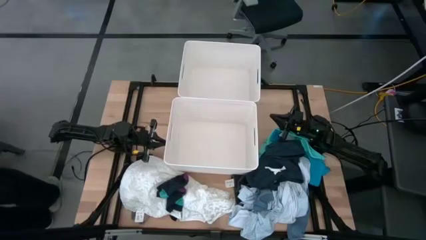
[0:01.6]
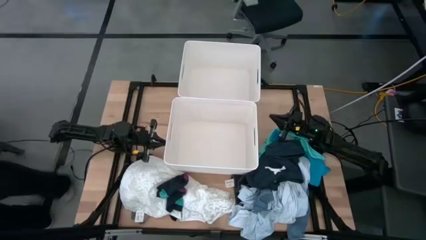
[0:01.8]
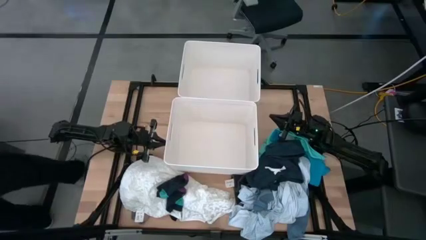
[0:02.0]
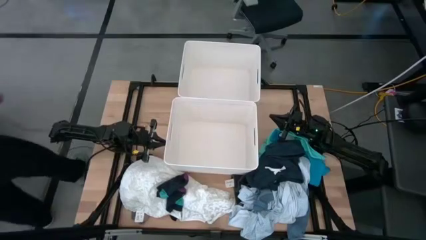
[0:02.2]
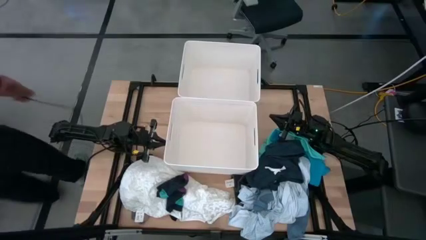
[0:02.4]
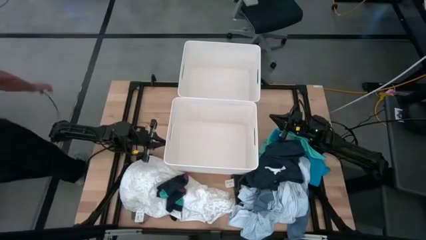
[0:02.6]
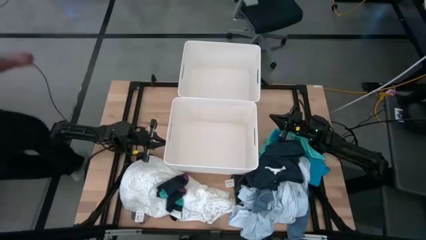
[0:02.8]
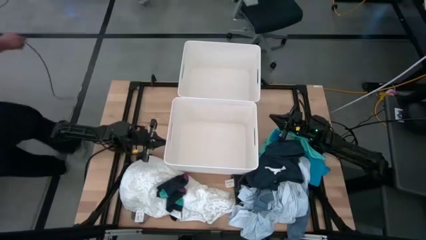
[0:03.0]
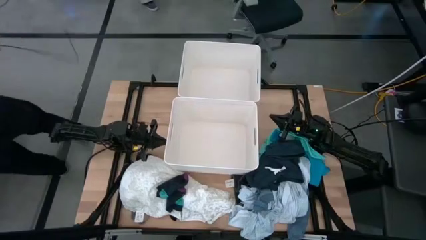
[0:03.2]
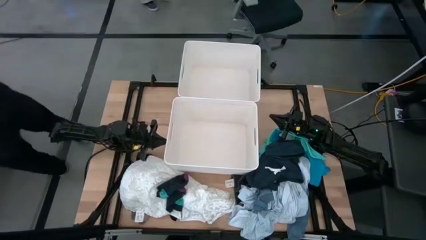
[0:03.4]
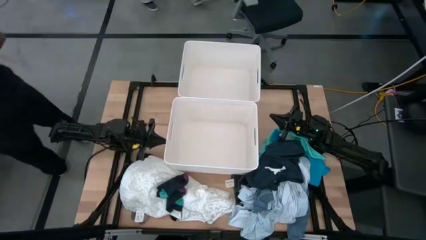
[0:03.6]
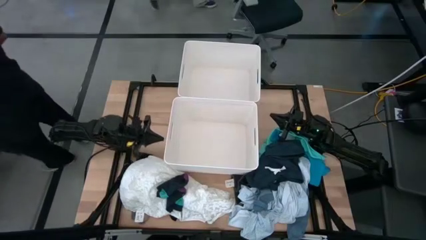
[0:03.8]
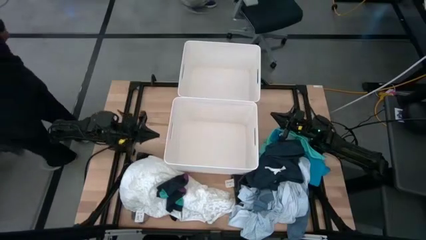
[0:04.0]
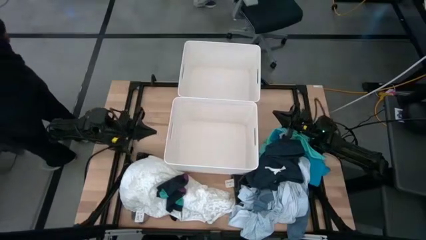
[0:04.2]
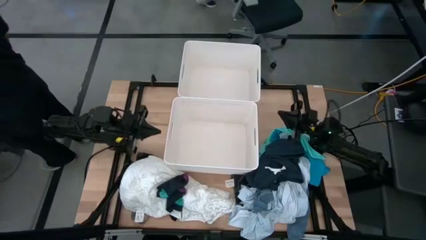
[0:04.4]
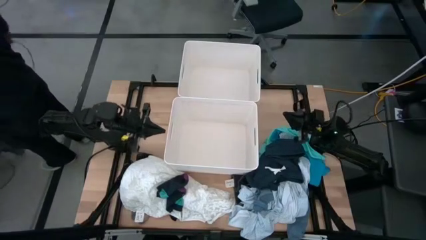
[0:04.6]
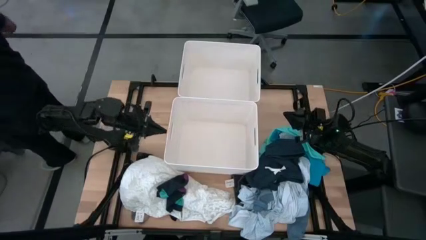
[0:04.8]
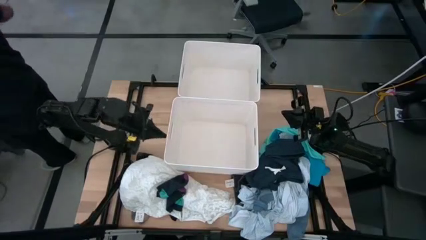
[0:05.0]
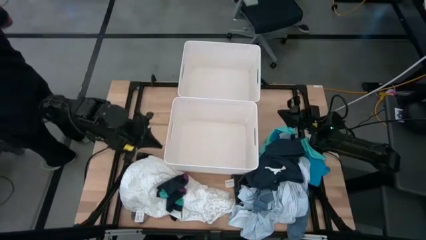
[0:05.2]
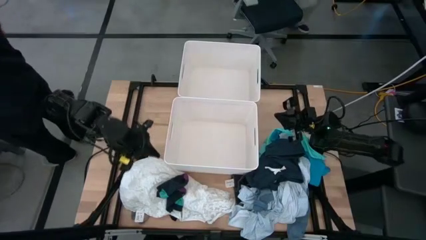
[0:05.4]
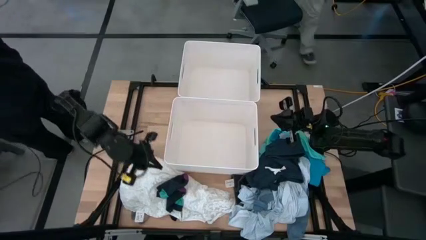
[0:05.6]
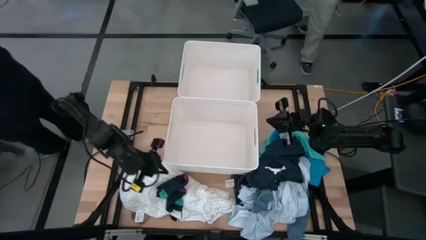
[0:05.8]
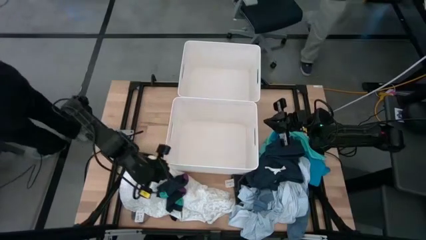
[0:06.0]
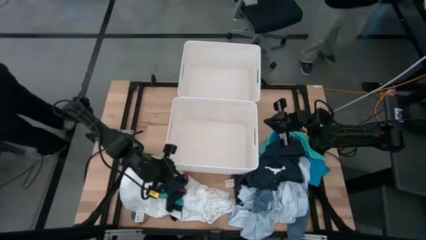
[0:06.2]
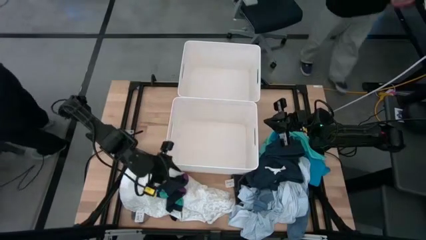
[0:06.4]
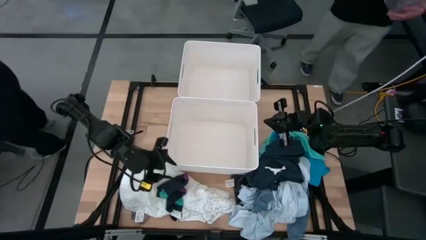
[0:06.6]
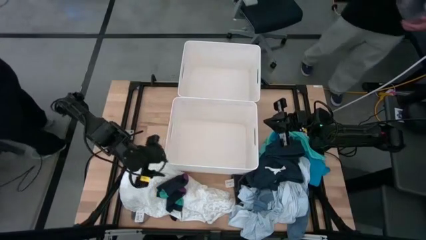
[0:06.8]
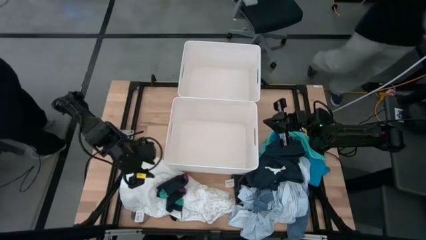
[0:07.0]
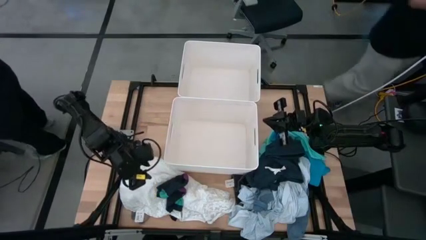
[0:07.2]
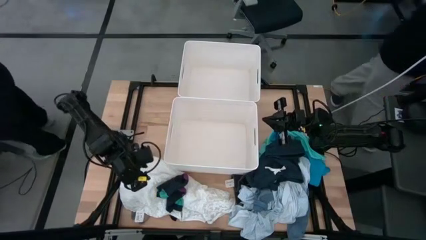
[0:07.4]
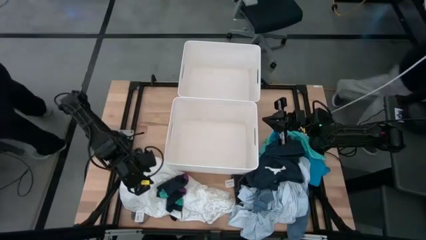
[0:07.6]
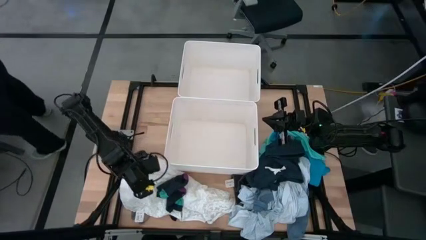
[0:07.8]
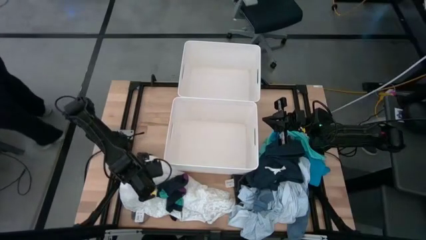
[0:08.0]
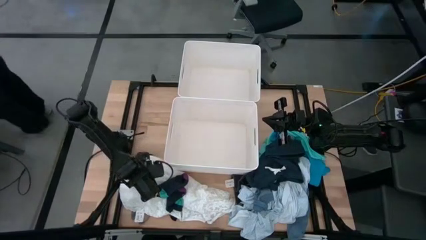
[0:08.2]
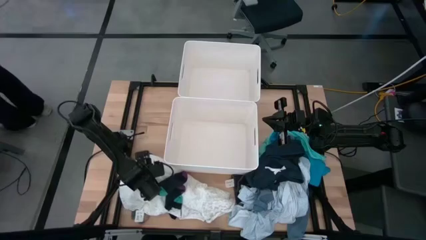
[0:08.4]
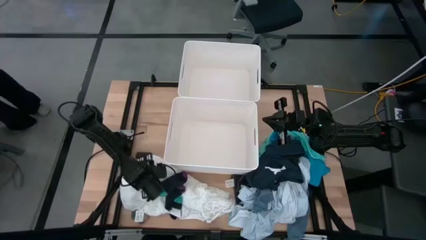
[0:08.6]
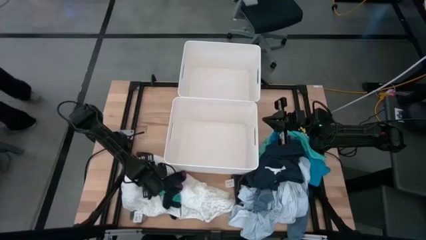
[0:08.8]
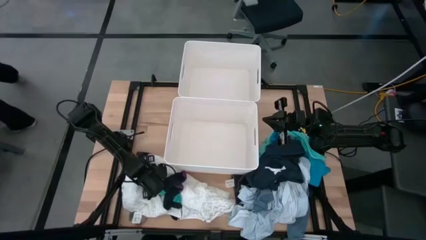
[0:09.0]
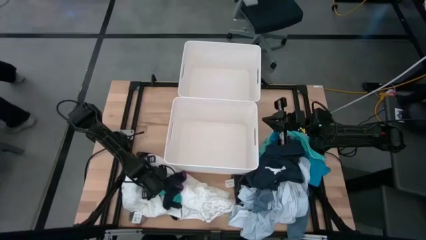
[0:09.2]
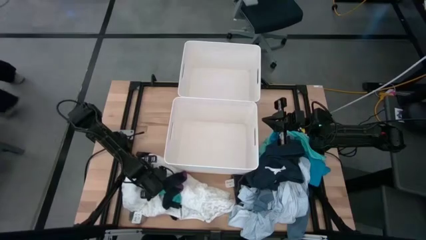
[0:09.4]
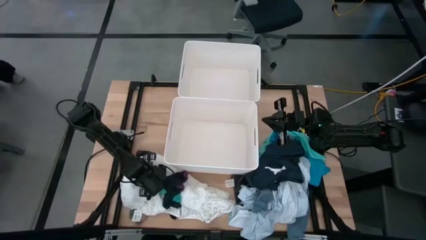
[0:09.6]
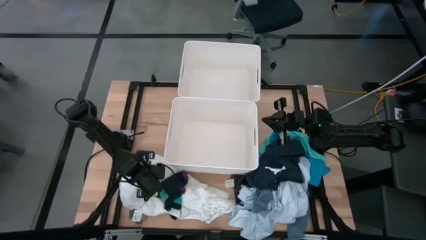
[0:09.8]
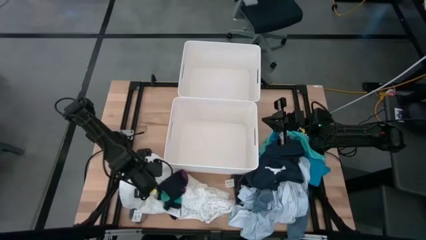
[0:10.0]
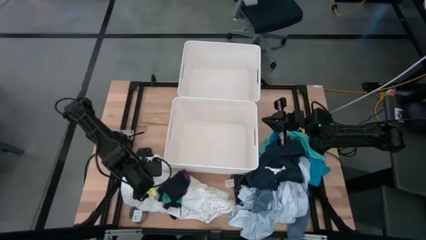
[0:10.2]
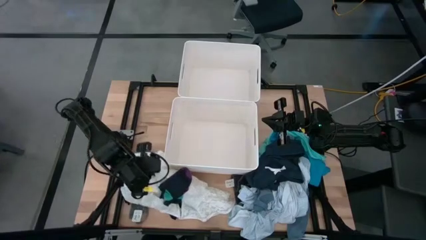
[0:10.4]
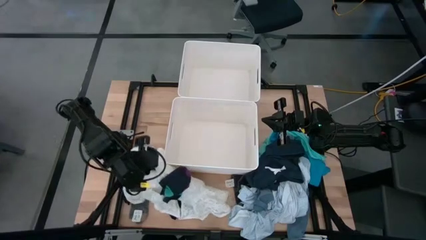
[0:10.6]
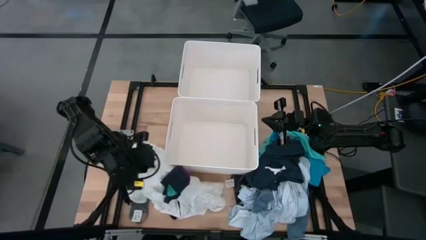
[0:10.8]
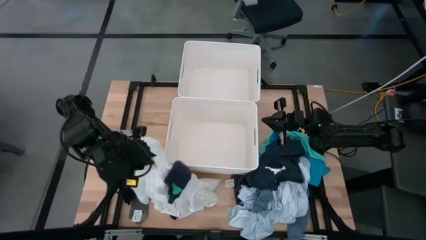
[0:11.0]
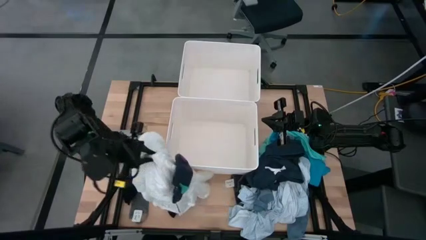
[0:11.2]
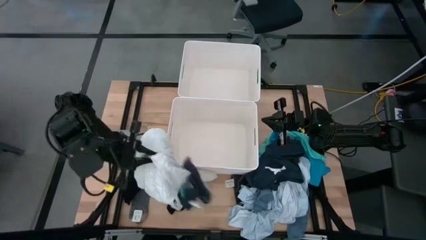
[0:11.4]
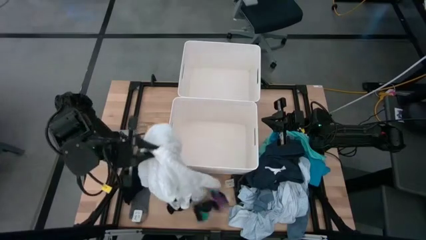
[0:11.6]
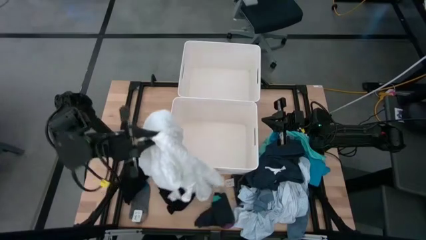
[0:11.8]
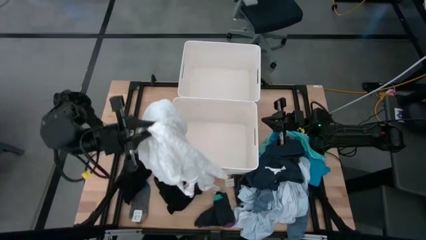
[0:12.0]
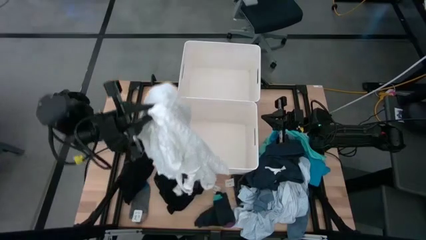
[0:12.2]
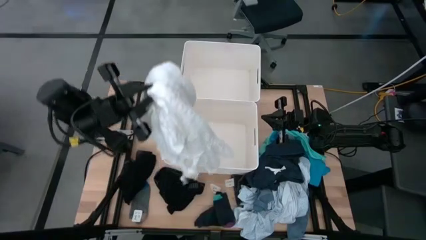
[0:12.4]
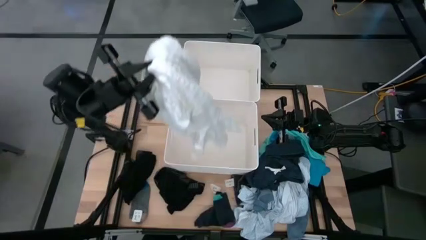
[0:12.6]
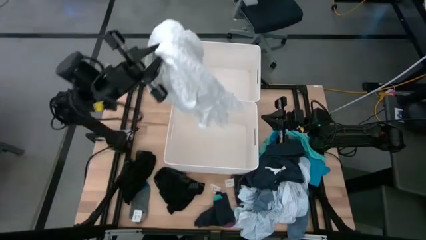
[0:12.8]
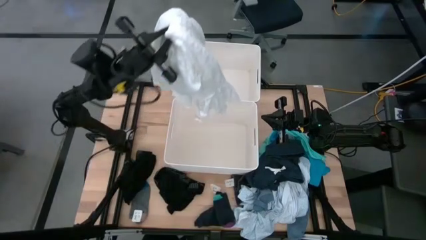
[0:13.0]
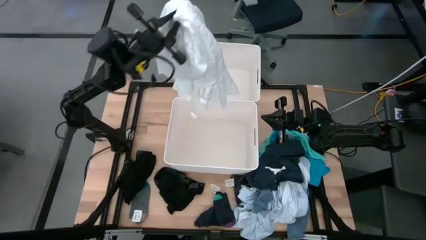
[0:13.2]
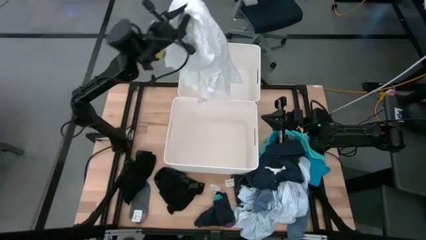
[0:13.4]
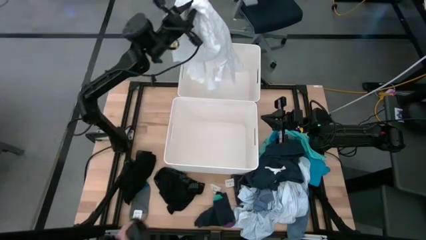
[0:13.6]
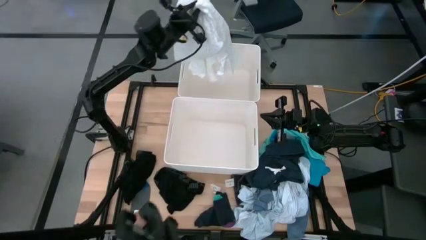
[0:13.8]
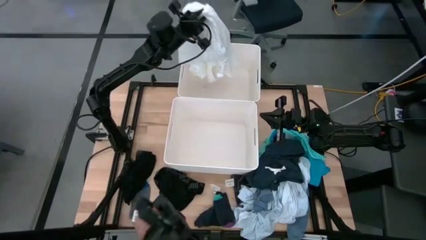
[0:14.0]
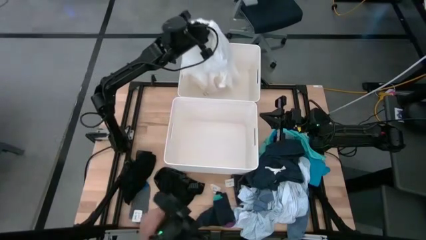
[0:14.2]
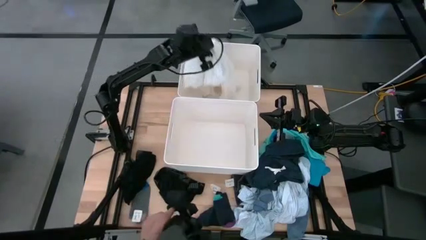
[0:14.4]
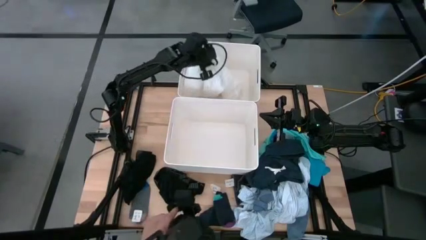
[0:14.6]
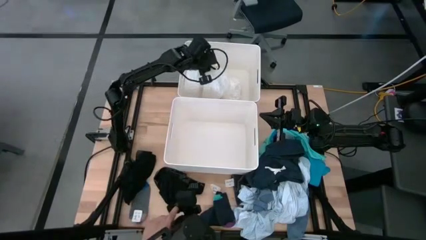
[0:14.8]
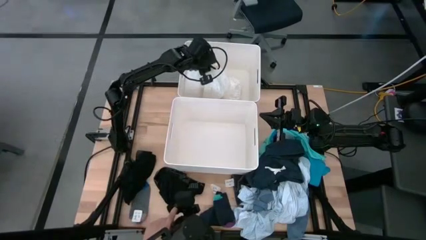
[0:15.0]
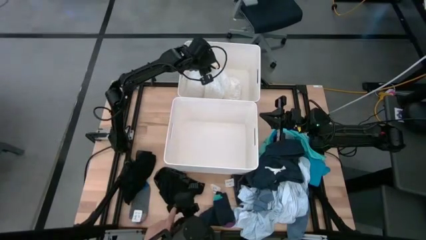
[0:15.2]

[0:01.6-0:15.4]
Task: Sort clothes
Put the white gown into the top white bin
